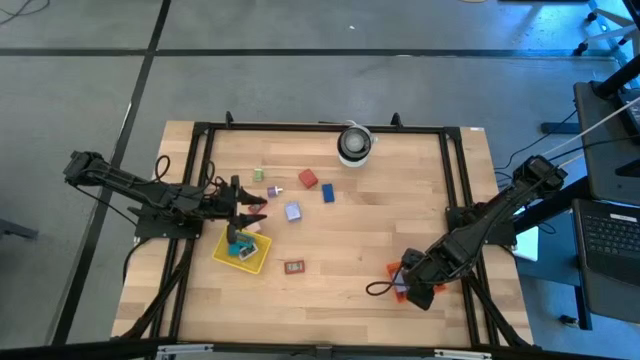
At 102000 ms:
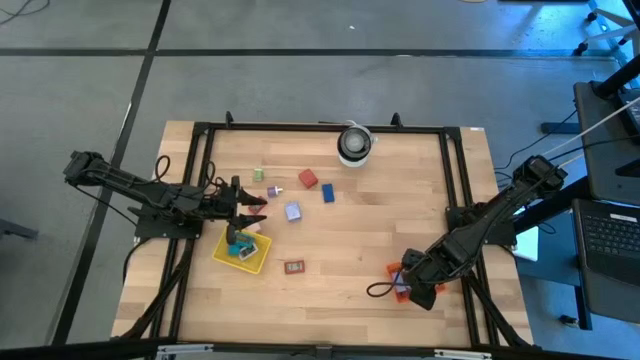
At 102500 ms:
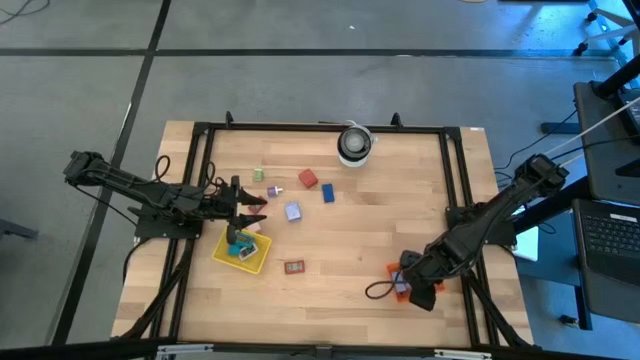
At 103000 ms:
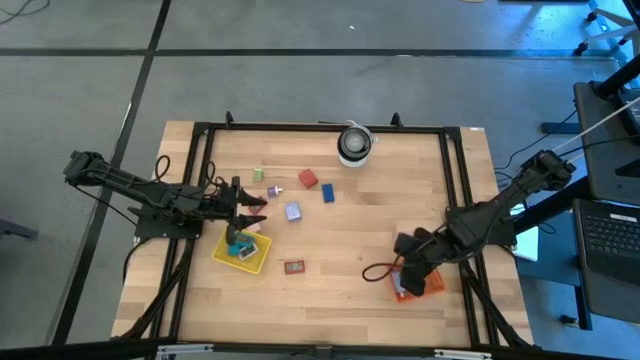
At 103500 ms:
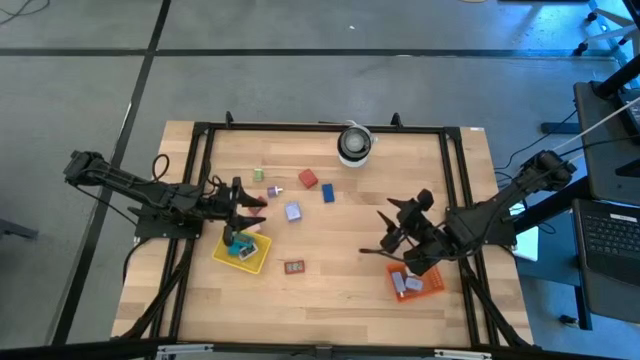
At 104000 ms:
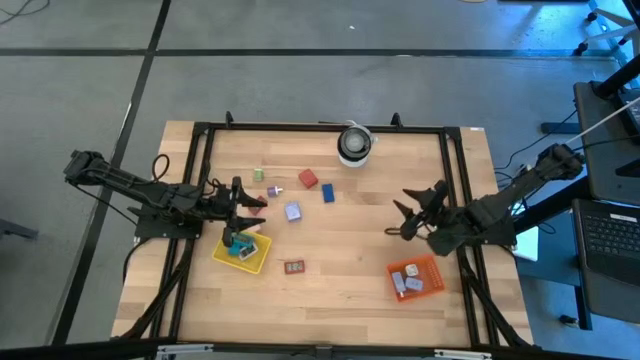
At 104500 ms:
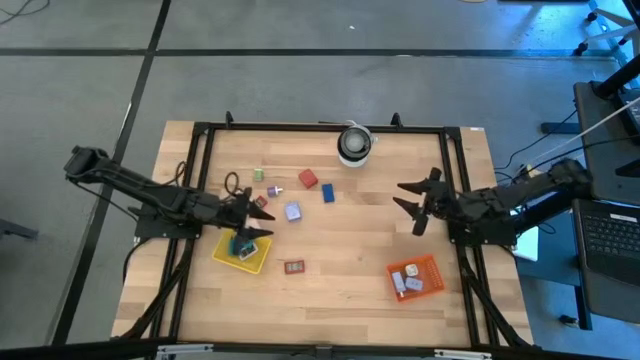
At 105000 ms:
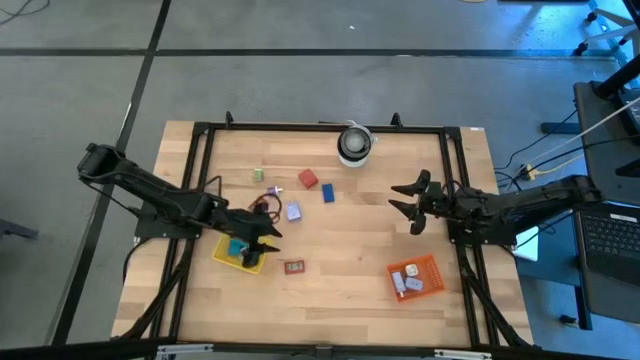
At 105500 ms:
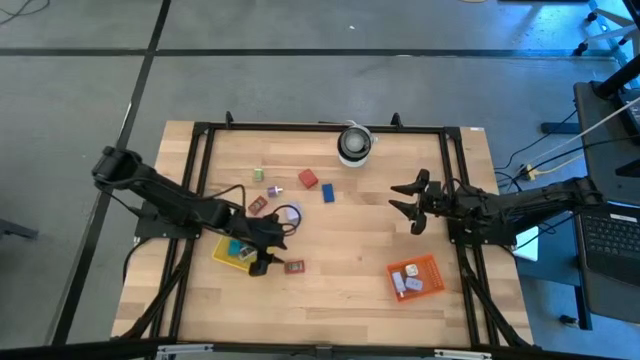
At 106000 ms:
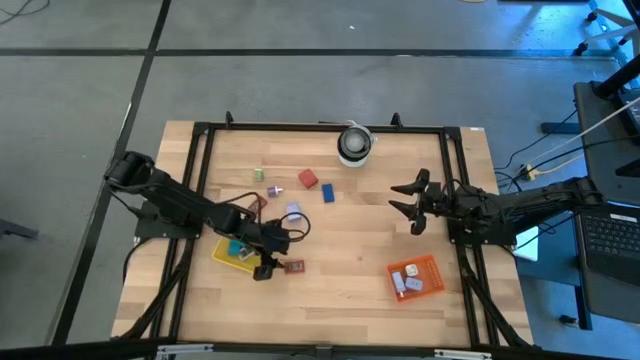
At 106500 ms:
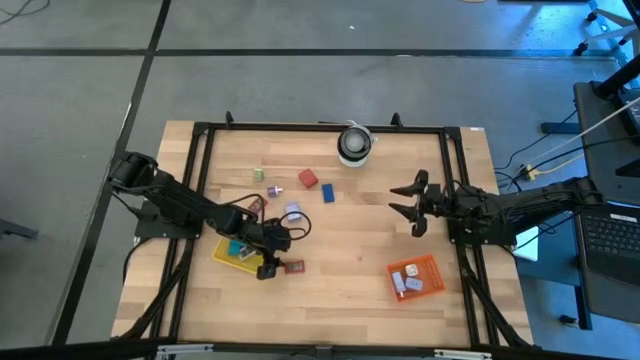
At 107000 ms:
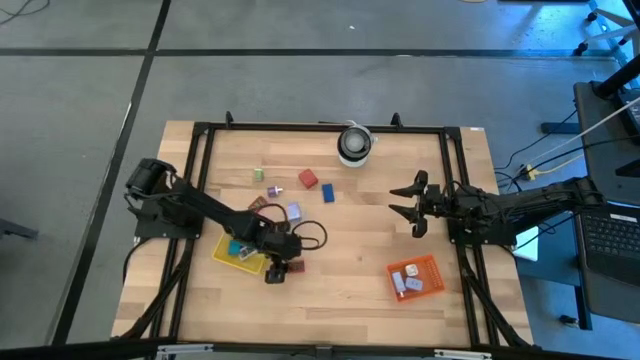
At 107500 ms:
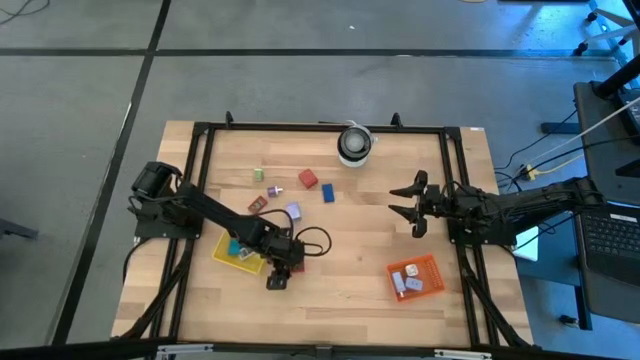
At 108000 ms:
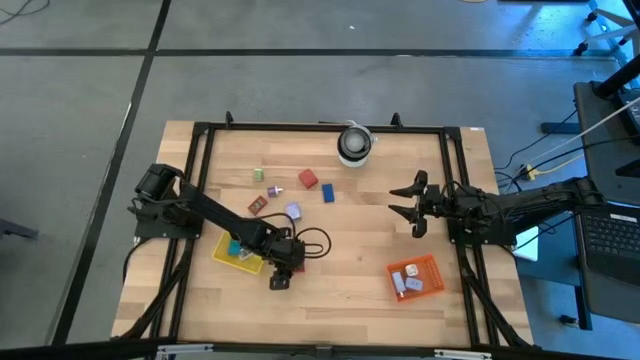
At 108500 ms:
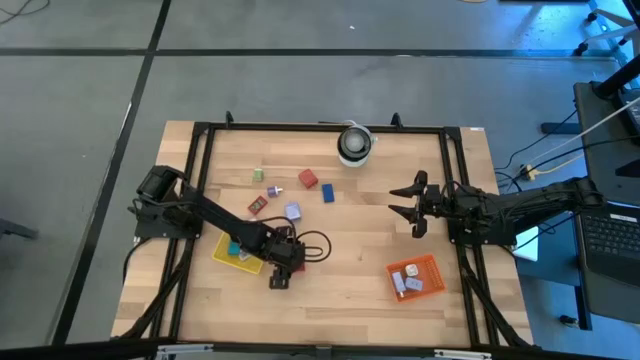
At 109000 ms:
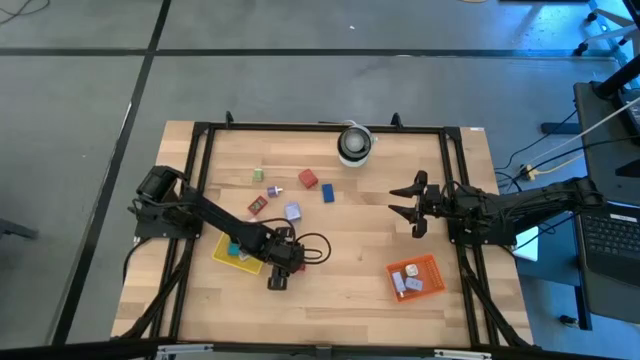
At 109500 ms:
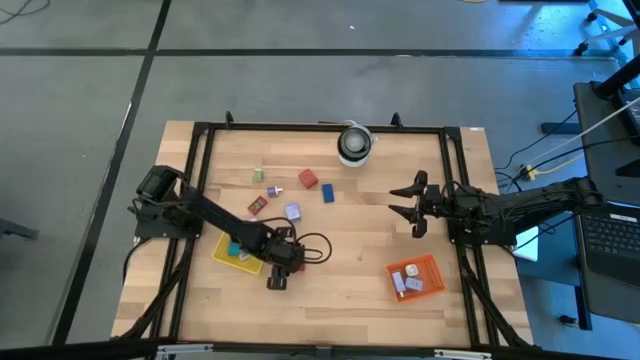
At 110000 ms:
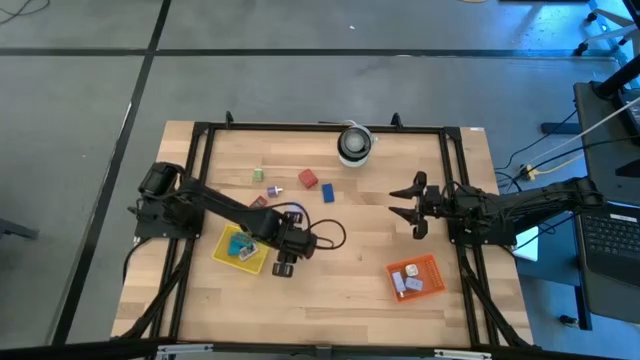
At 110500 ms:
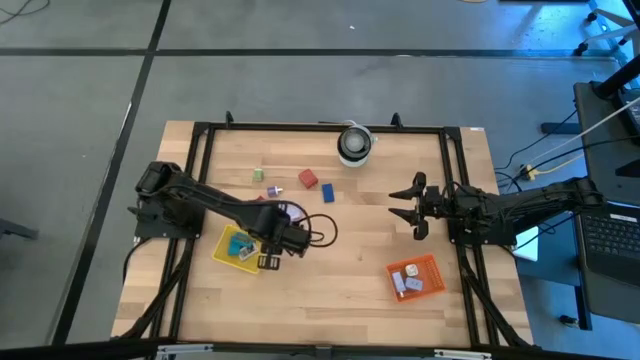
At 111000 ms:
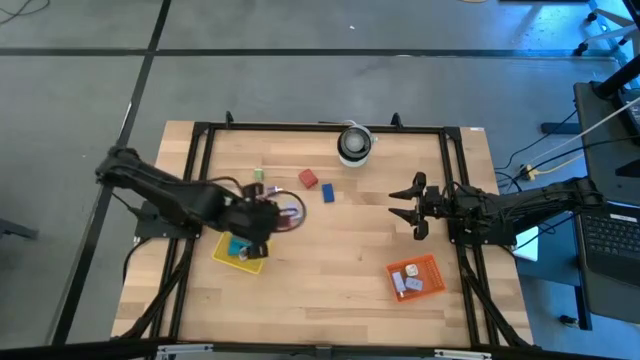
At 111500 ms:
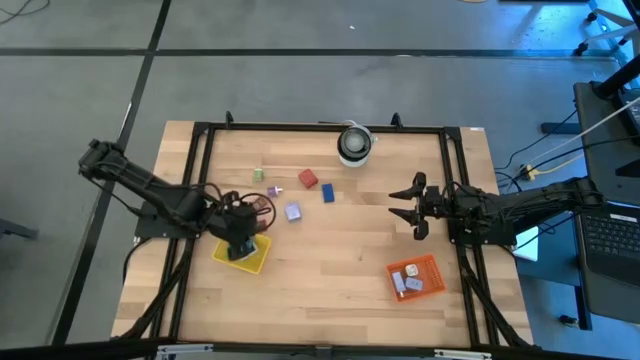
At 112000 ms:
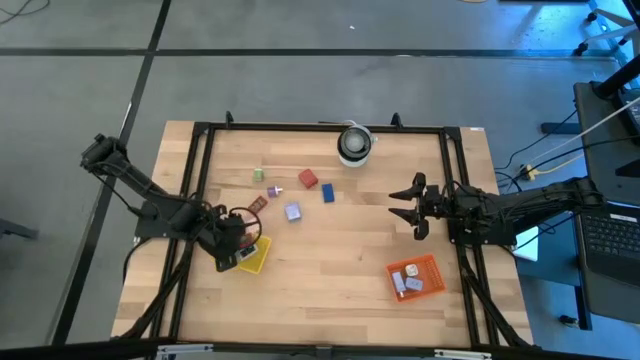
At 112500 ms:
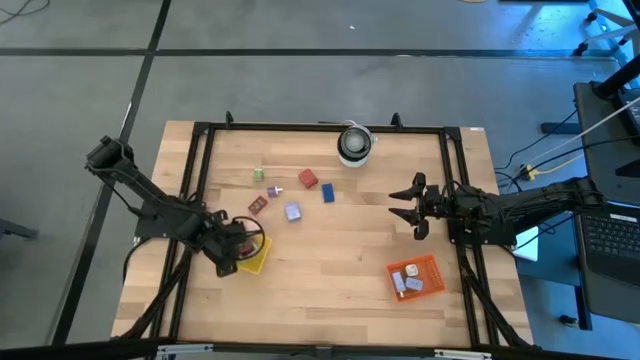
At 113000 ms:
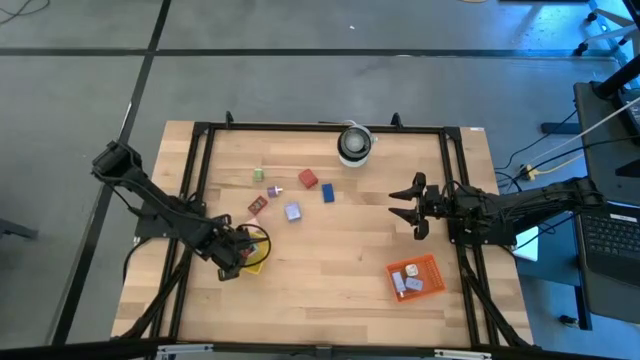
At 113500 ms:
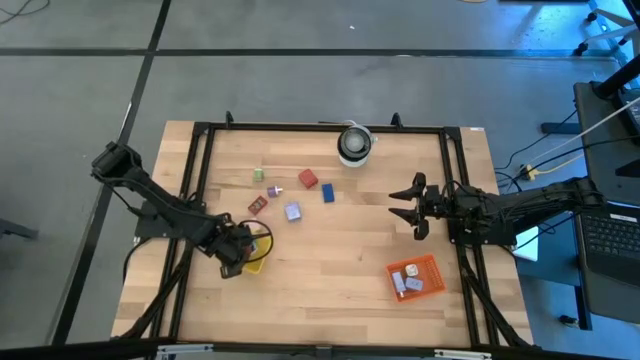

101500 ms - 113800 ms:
Task: Pick & Place Office items
Put the bottom red digital timer into the yellow bin
